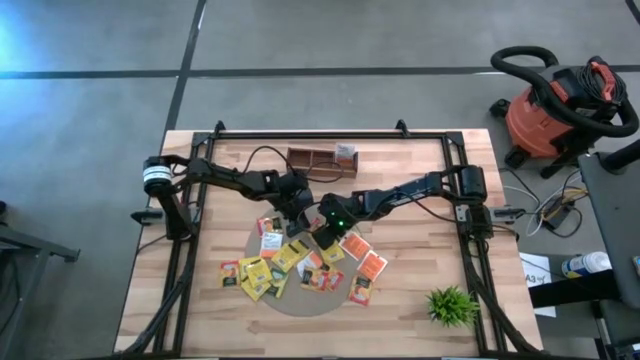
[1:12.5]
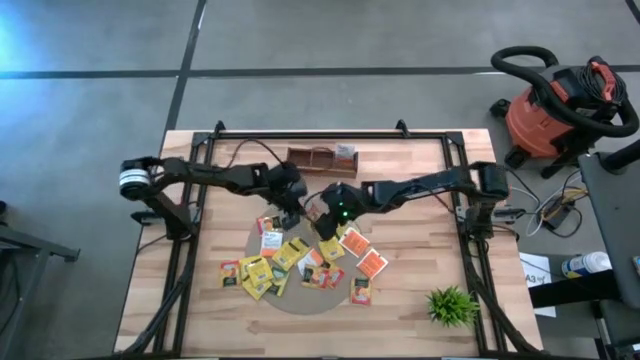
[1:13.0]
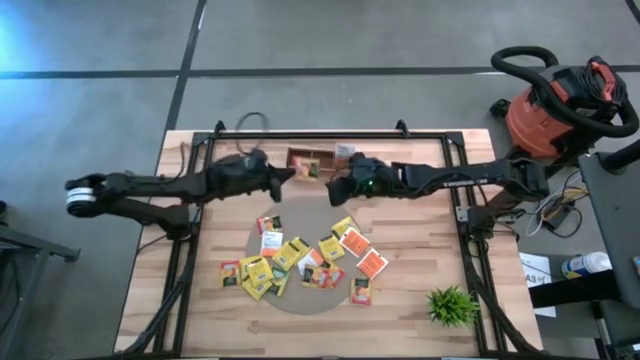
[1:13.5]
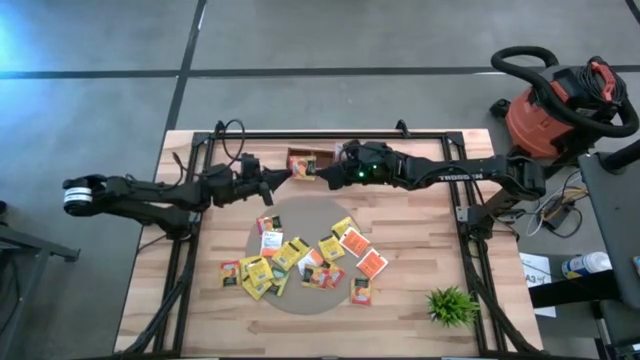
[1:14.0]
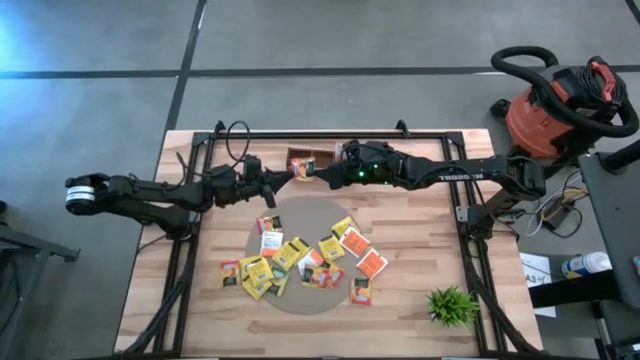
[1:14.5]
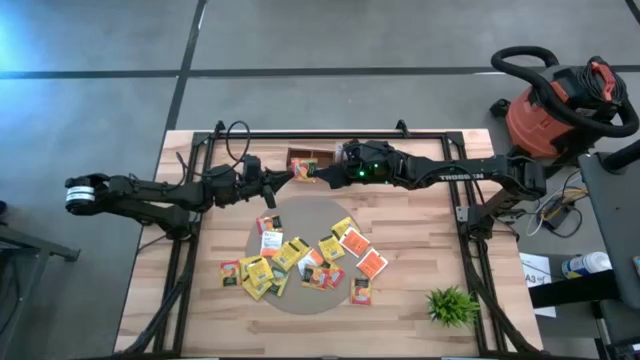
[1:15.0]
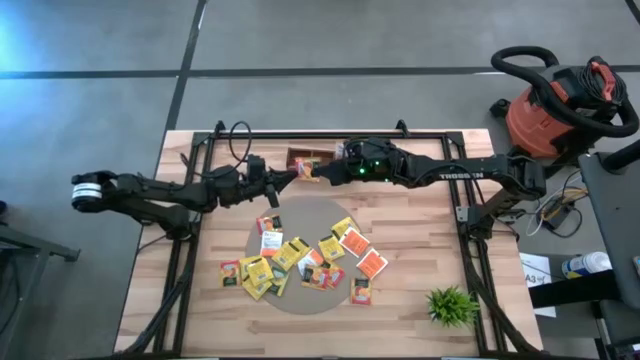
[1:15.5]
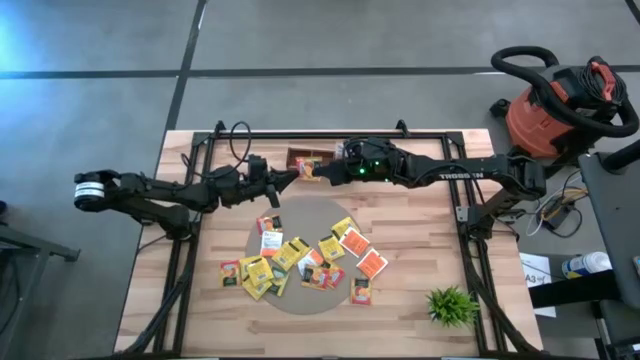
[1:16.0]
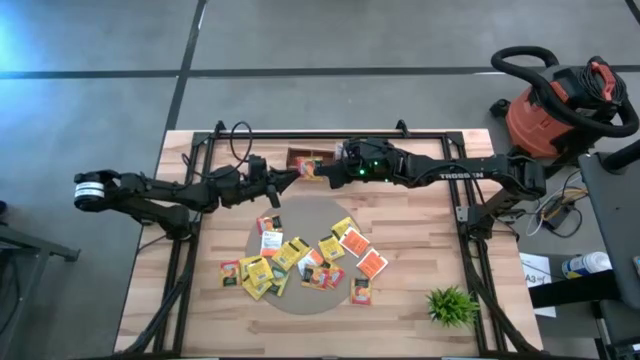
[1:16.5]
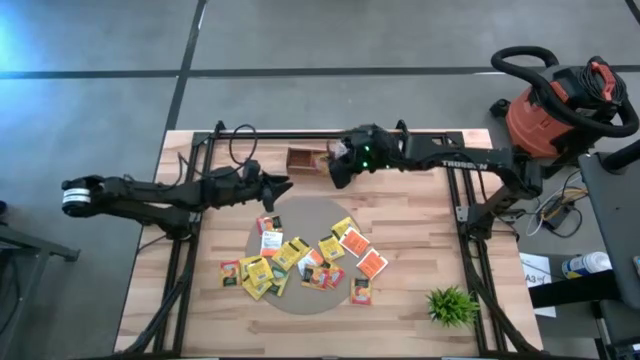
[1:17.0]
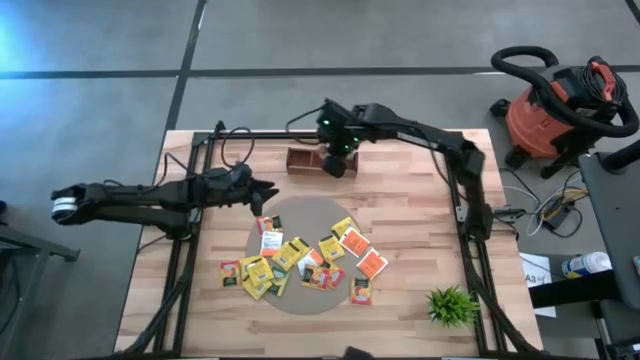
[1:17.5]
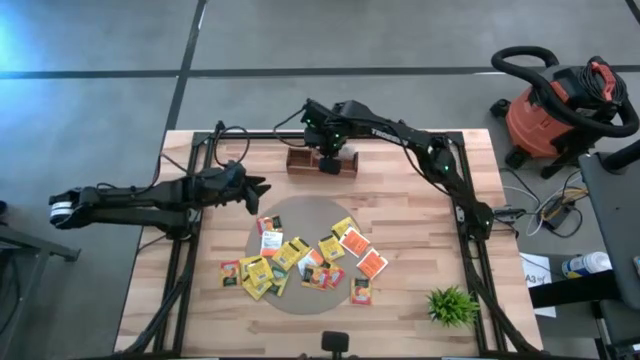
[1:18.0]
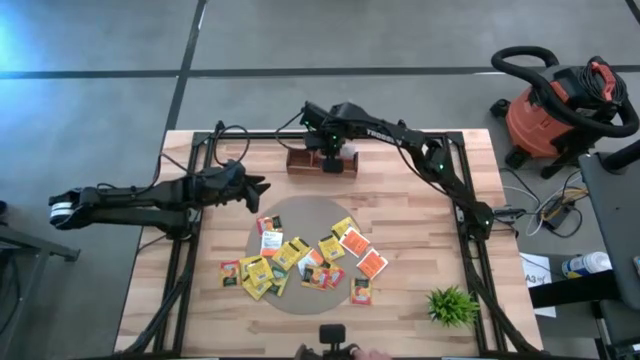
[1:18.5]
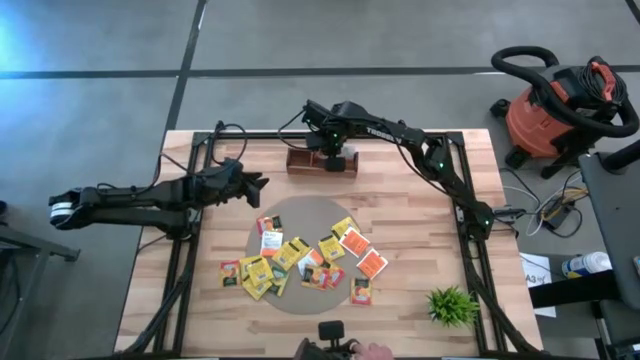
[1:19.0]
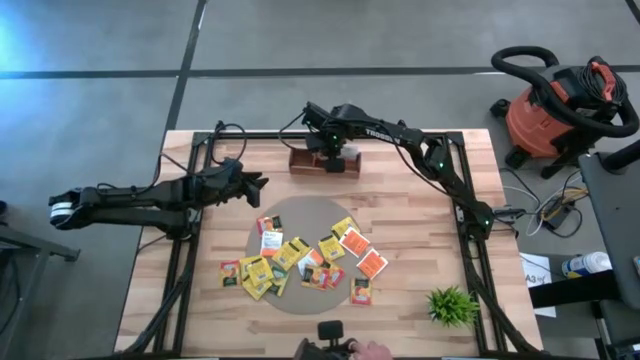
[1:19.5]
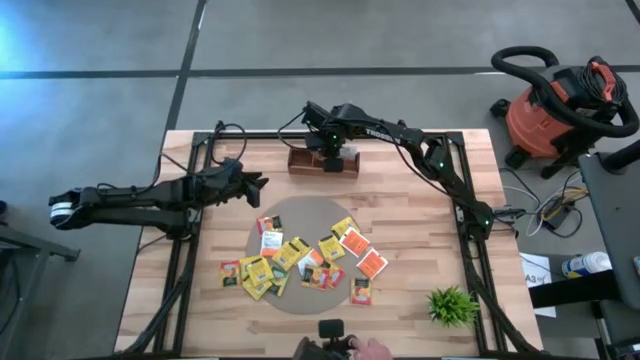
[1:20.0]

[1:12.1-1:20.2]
Task: Pick & Place Tea
Put the orange tea bag into the middle compartment of the wooden organizer

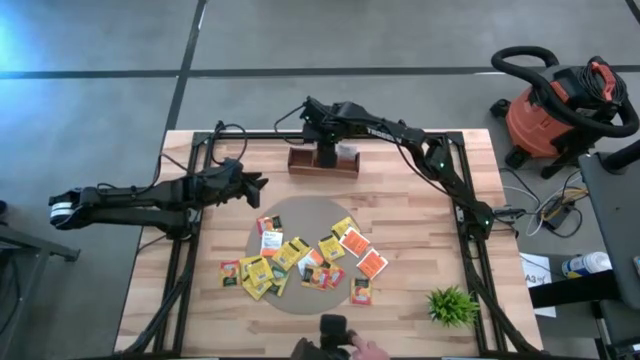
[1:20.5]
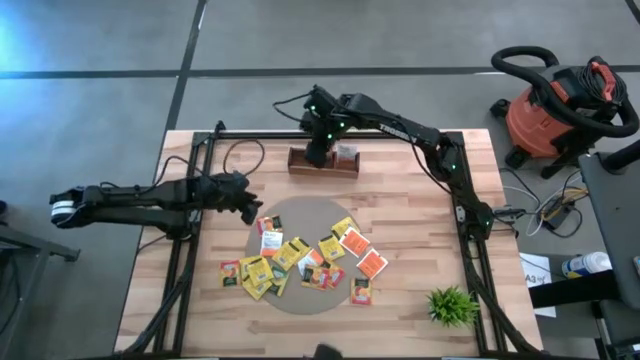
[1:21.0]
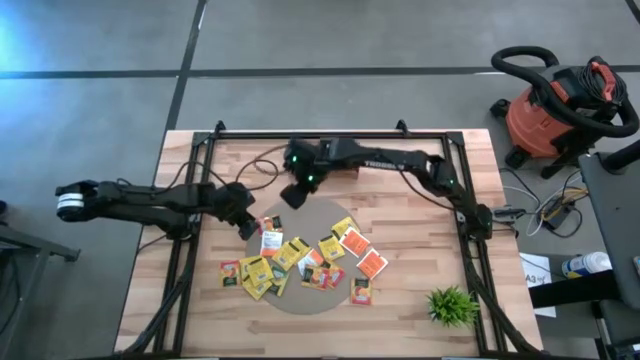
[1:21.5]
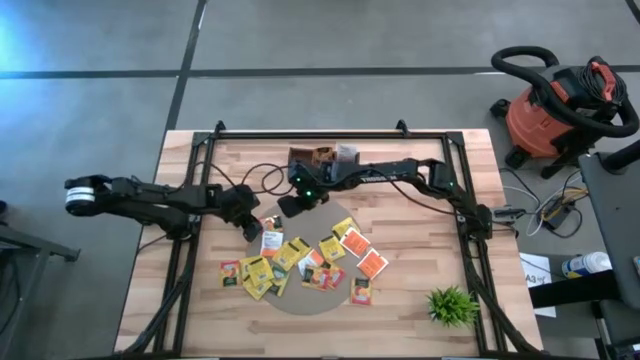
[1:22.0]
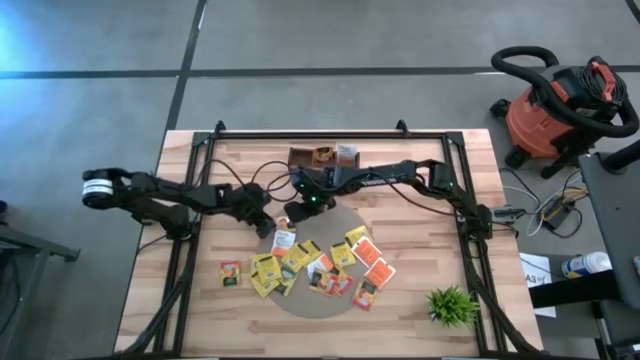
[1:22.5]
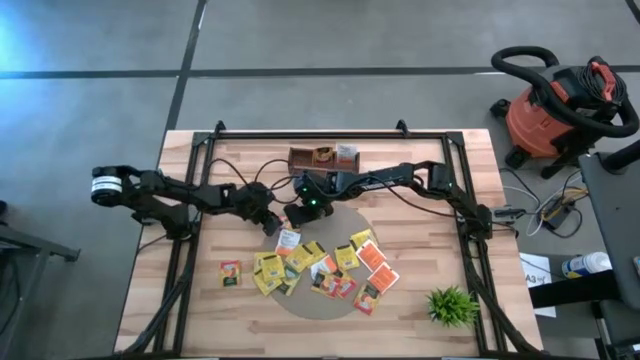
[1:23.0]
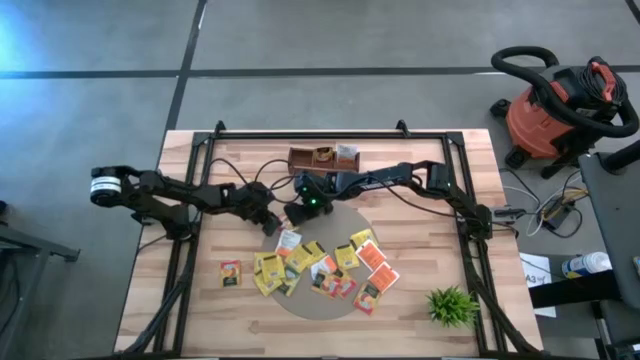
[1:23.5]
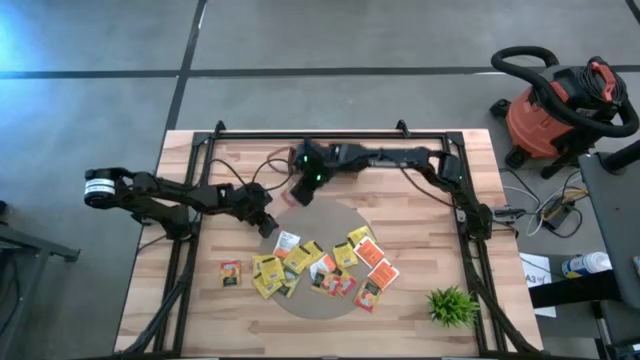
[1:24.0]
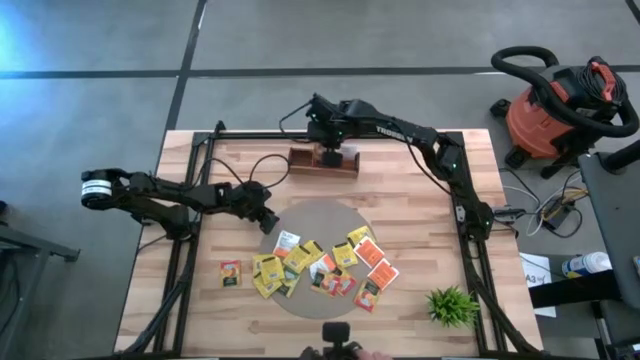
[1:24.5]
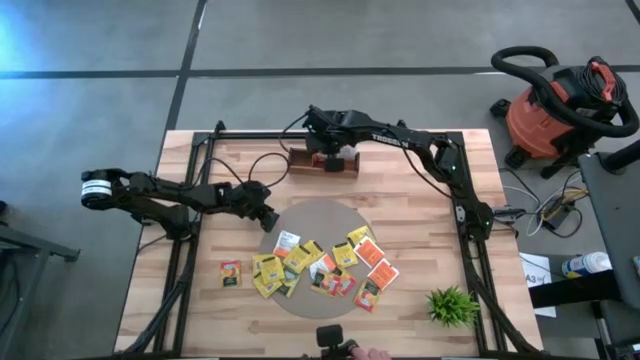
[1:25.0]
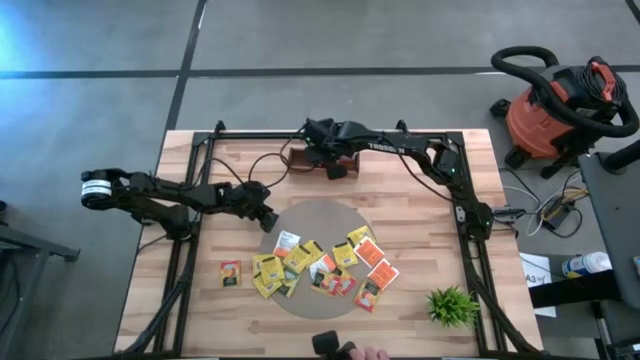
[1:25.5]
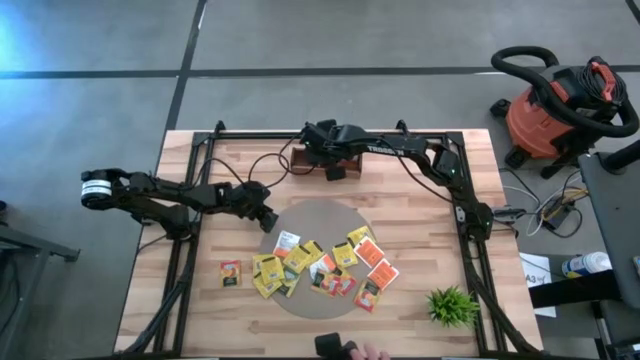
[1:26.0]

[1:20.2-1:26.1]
Put the orange tea bag into the middle compartment of the wooden organizer

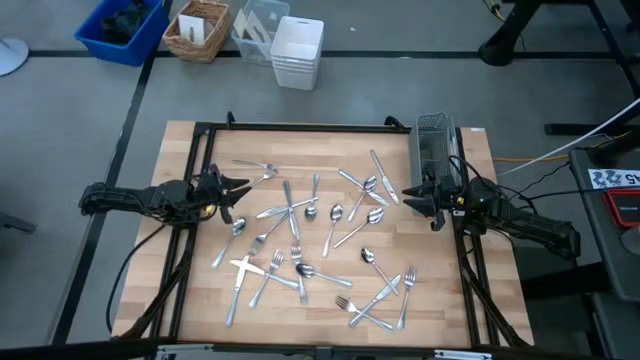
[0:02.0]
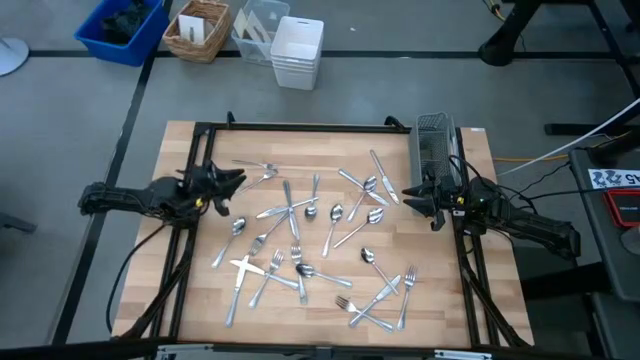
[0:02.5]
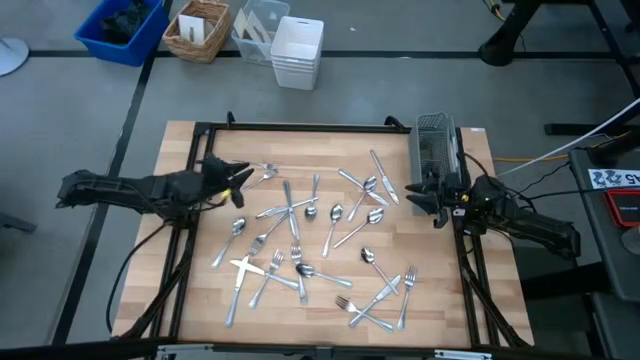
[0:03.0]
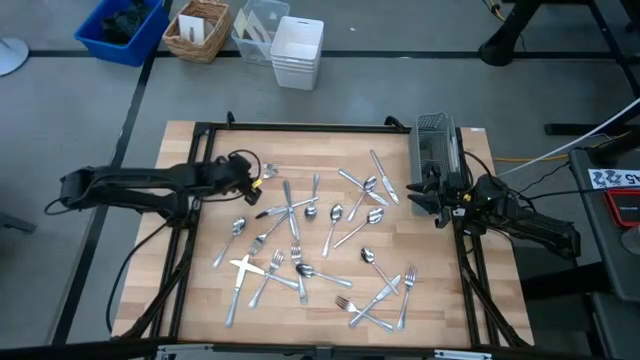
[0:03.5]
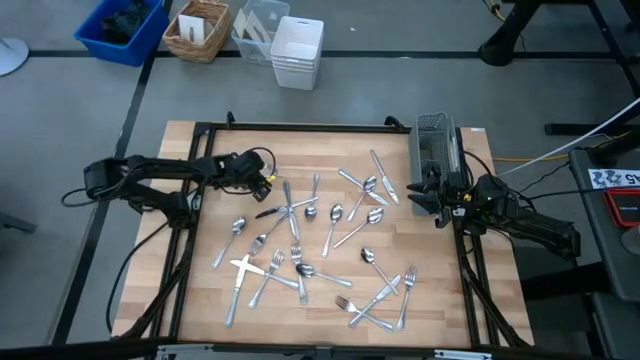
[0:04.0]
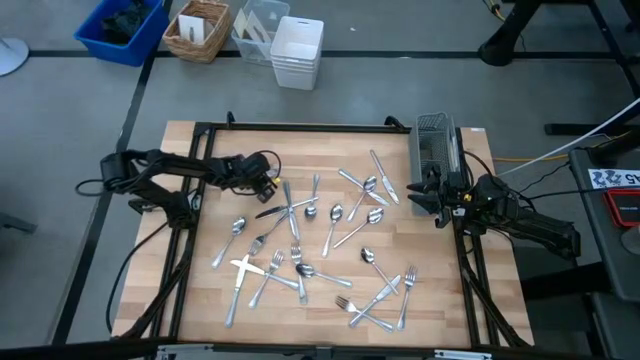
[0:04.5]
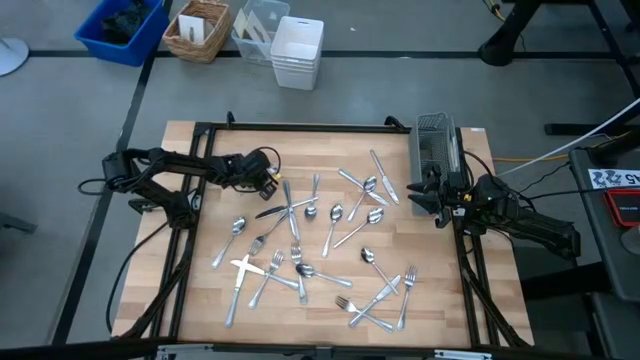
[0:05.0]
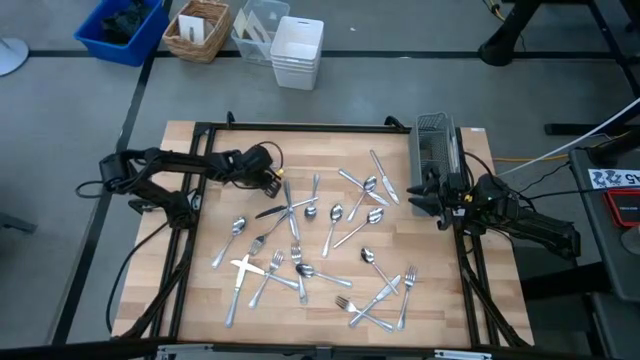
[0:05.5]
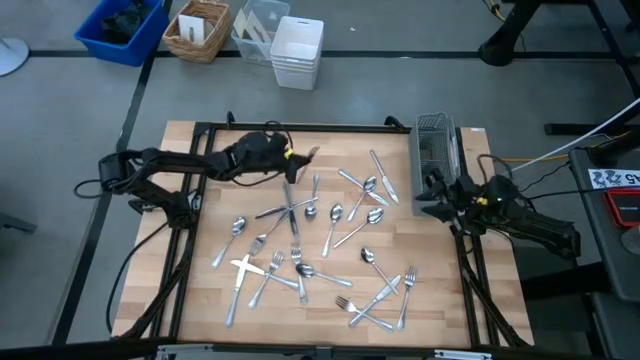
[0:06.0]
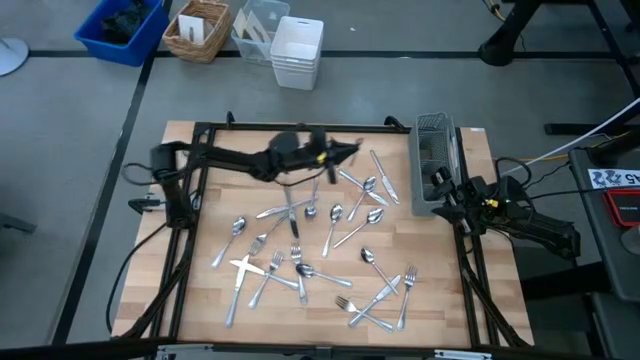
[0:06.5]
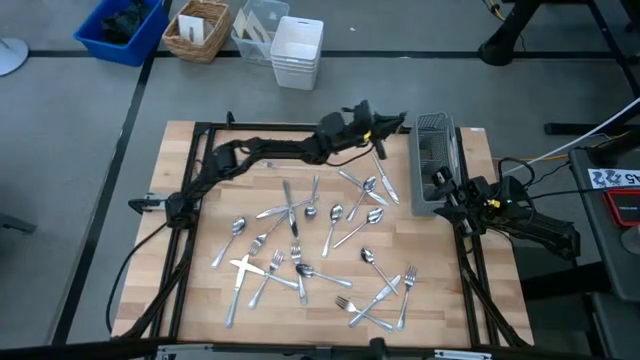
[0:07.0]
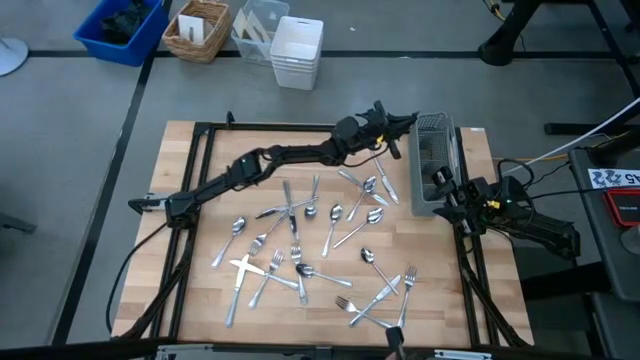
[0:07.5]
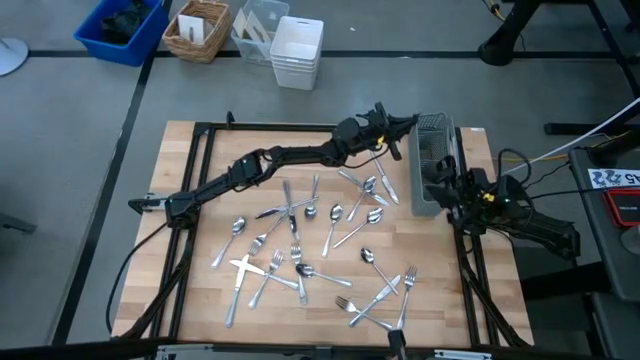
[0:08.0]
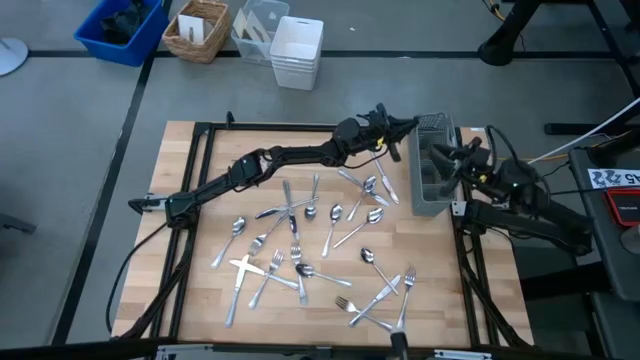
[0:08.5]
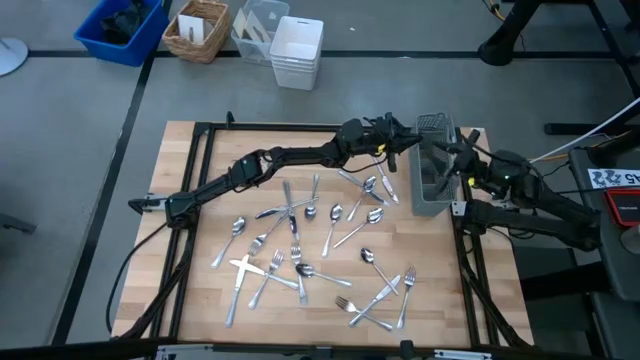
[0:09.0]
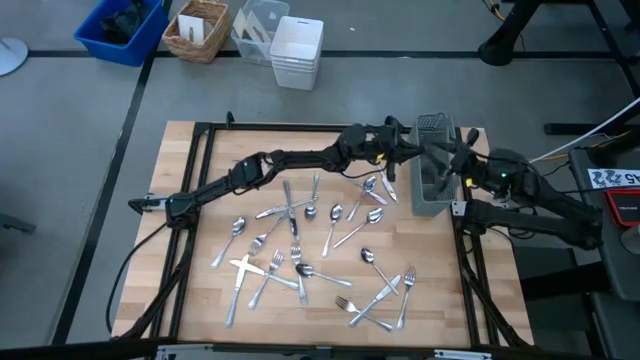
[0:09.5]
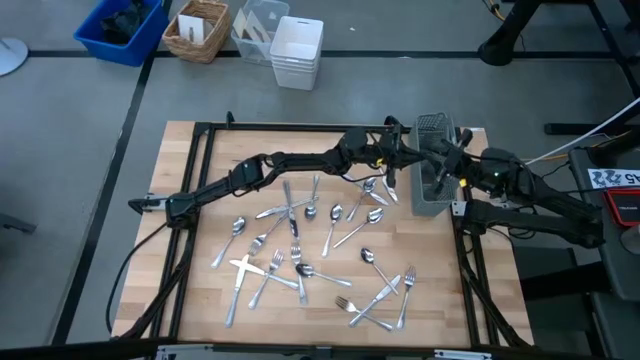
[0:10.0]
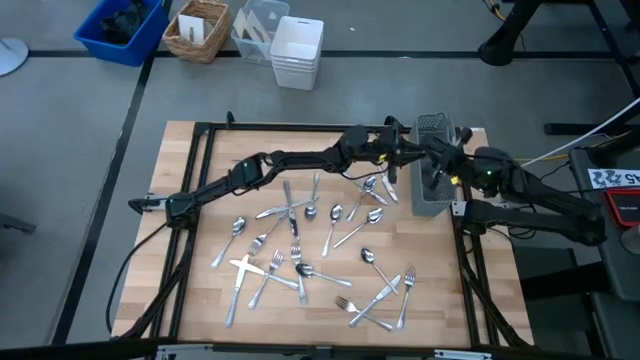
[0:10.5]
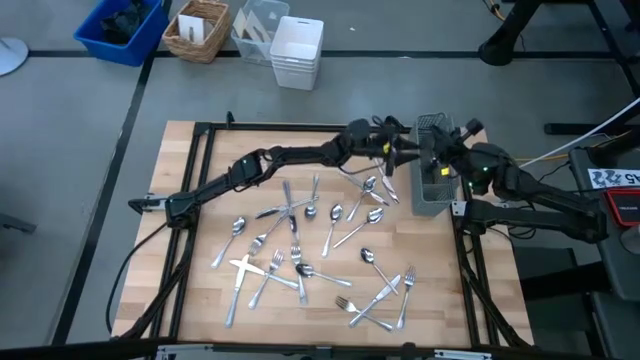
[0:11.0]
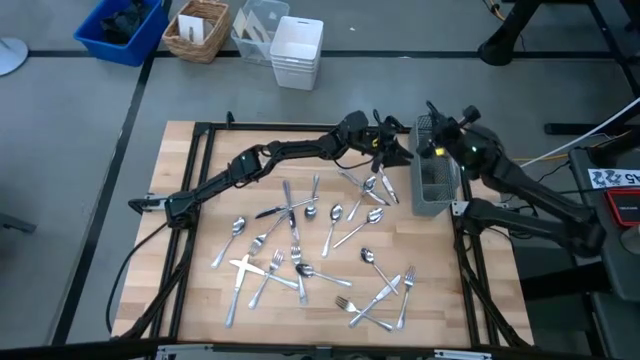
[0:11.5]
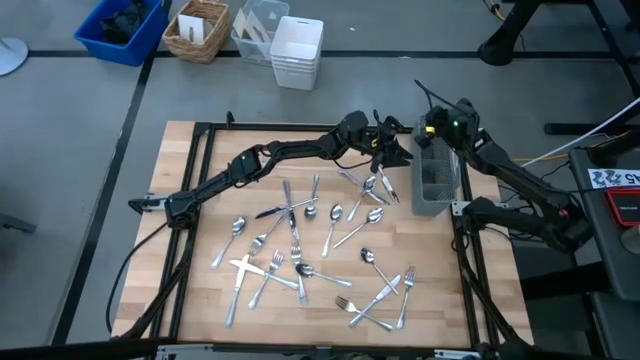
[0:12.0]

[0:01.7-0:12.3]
Task: Sort silverware
Put the fork into the left section of the utensil holder
